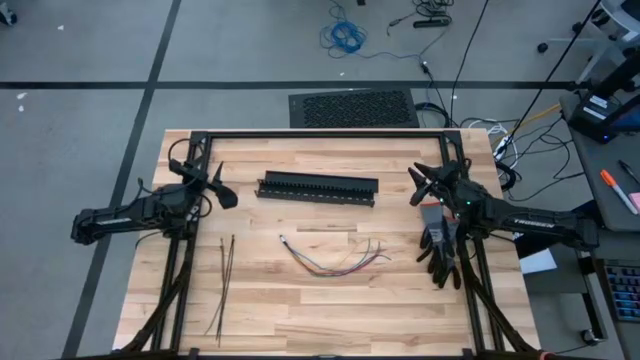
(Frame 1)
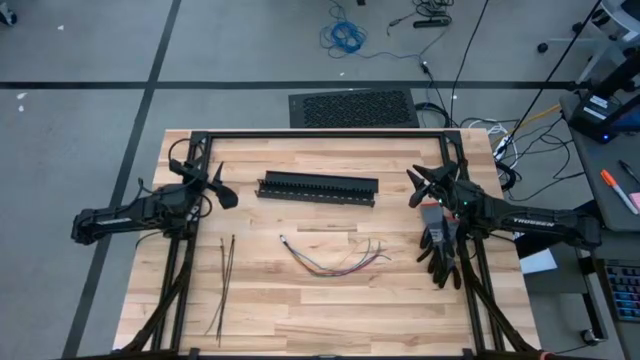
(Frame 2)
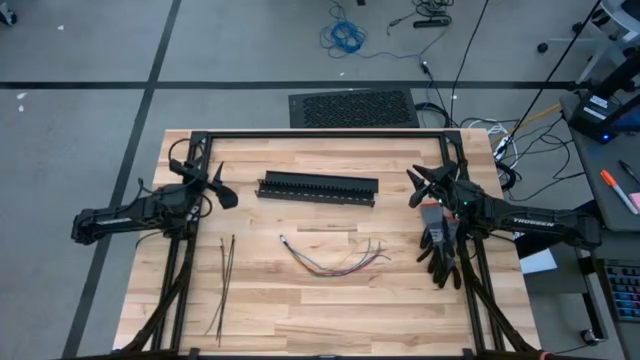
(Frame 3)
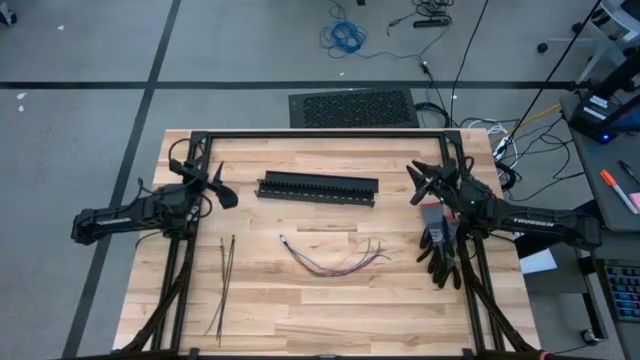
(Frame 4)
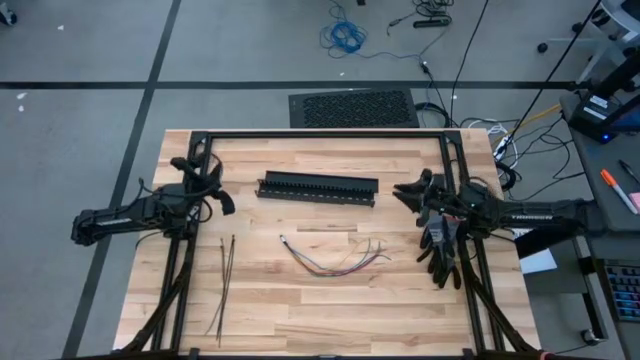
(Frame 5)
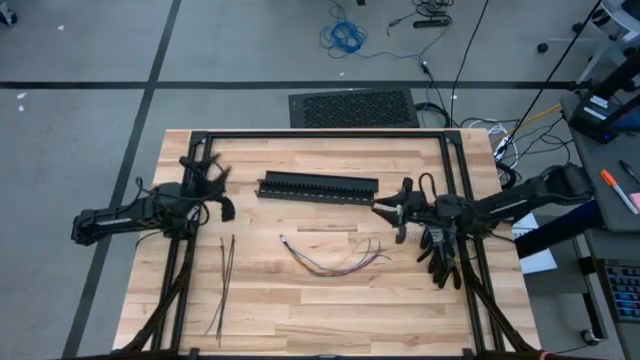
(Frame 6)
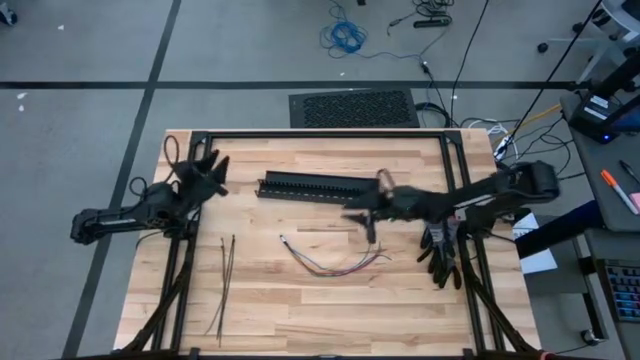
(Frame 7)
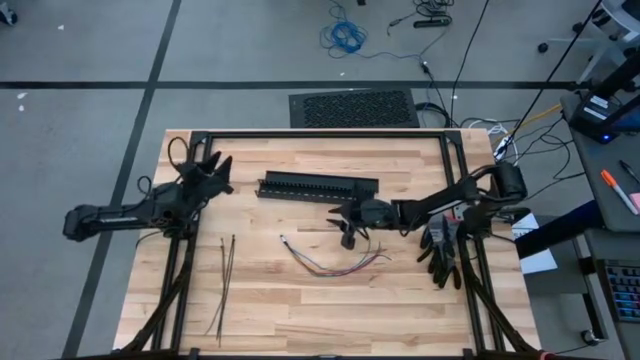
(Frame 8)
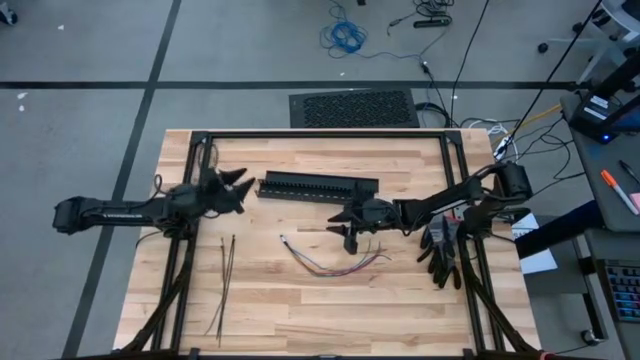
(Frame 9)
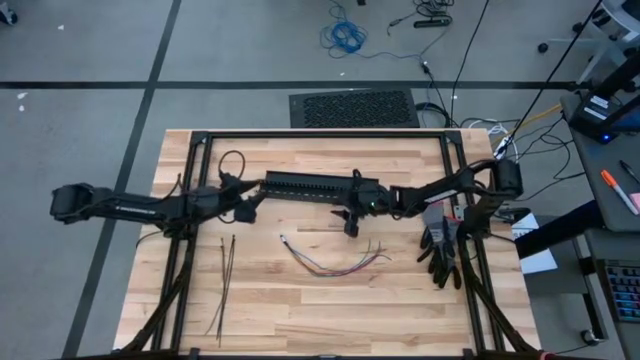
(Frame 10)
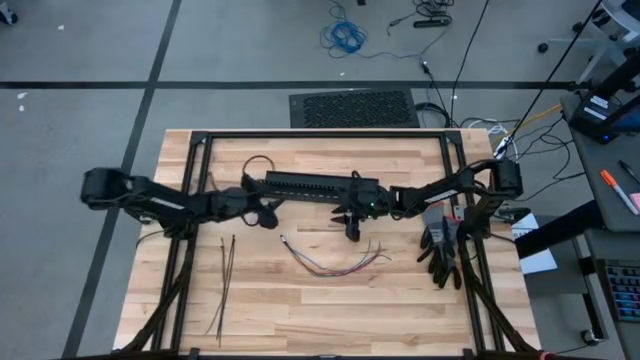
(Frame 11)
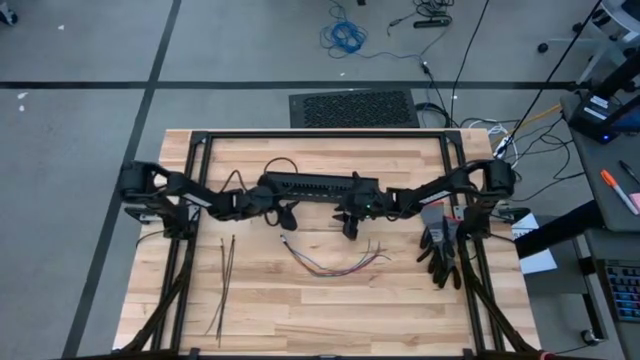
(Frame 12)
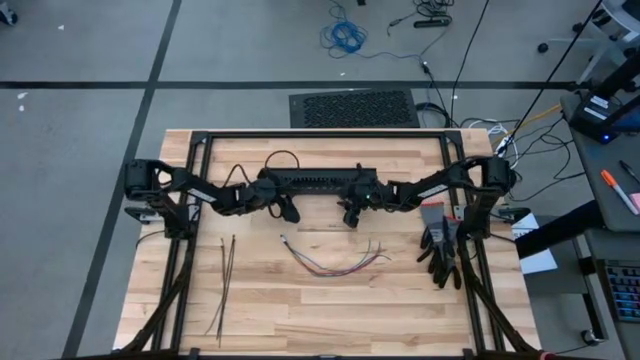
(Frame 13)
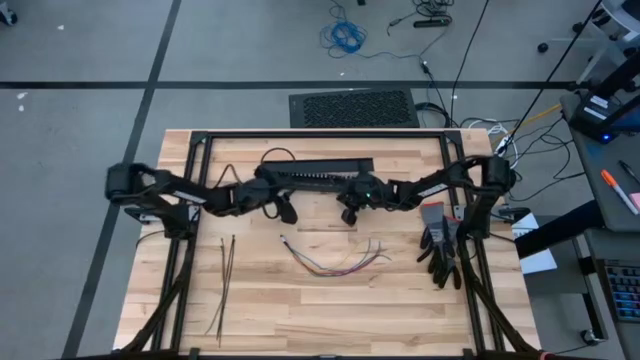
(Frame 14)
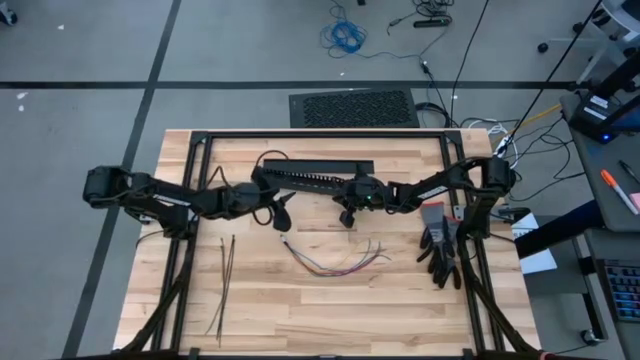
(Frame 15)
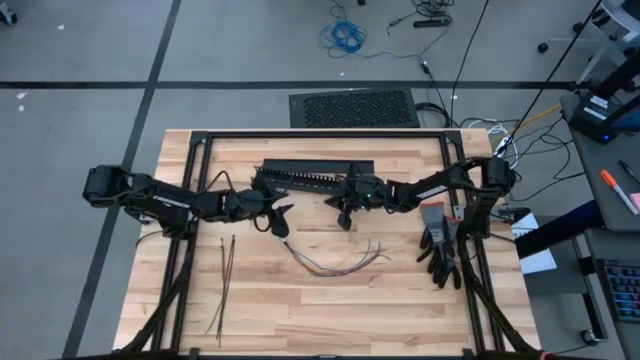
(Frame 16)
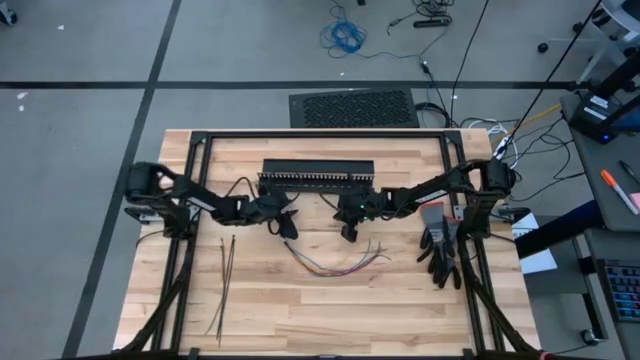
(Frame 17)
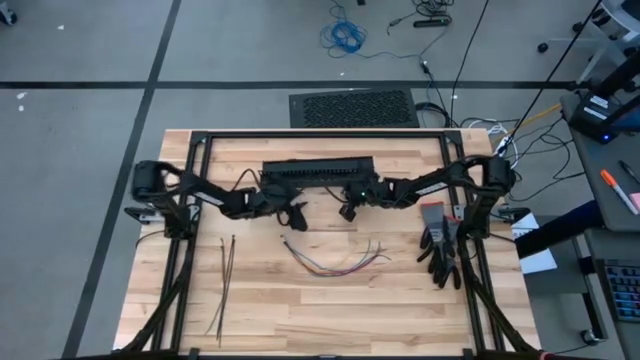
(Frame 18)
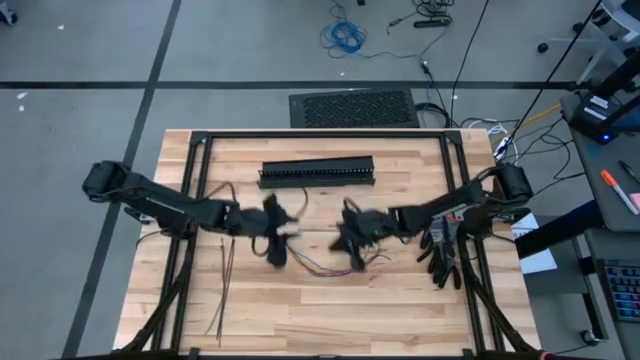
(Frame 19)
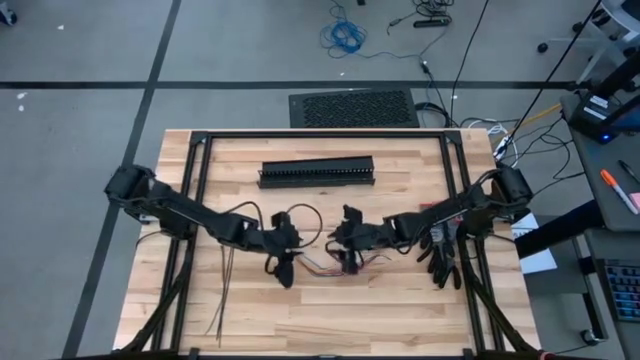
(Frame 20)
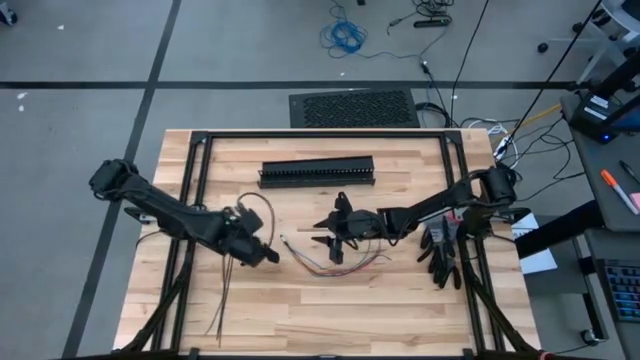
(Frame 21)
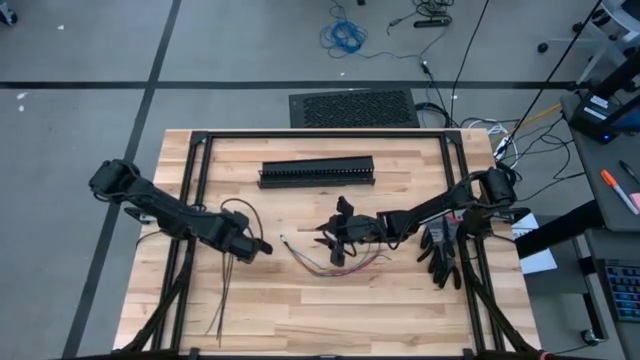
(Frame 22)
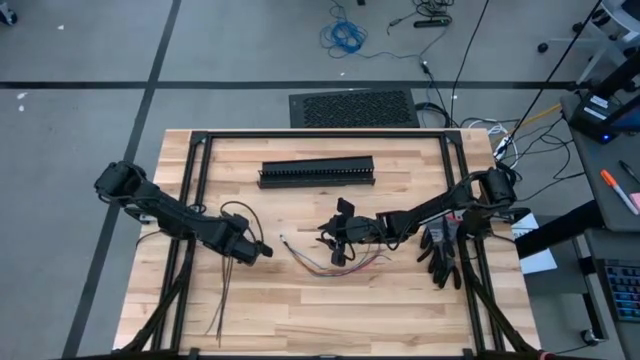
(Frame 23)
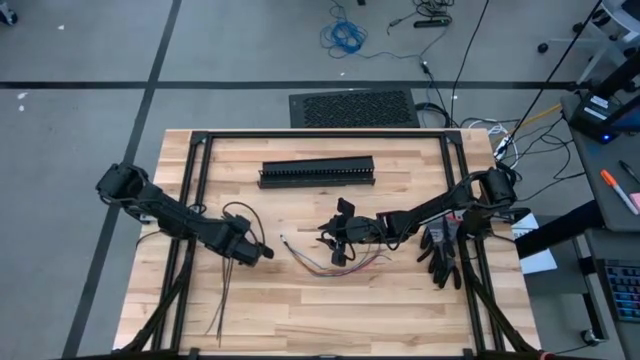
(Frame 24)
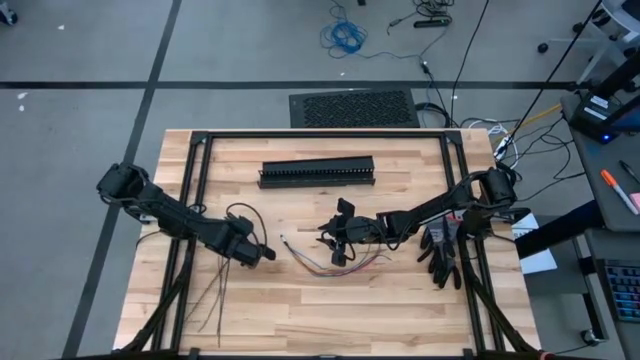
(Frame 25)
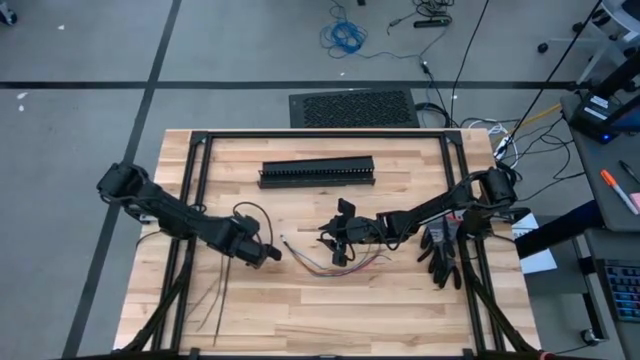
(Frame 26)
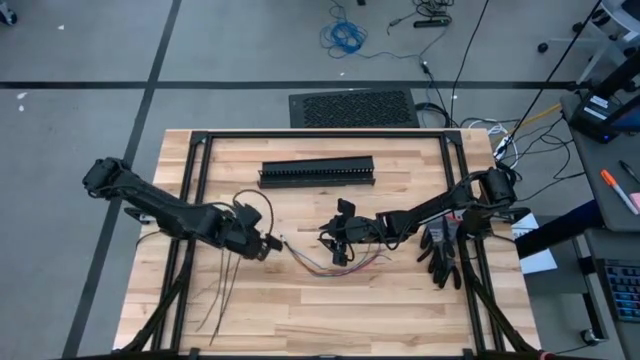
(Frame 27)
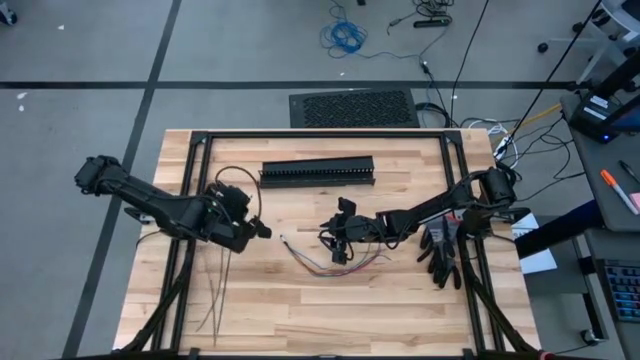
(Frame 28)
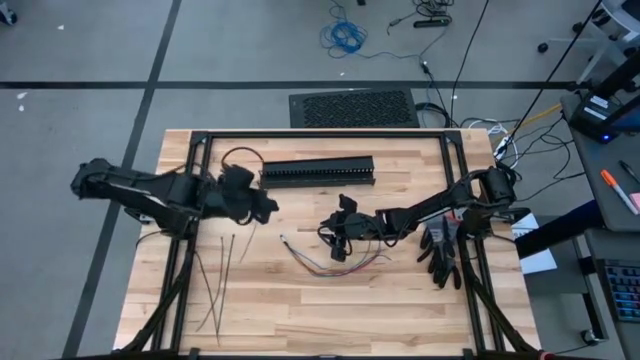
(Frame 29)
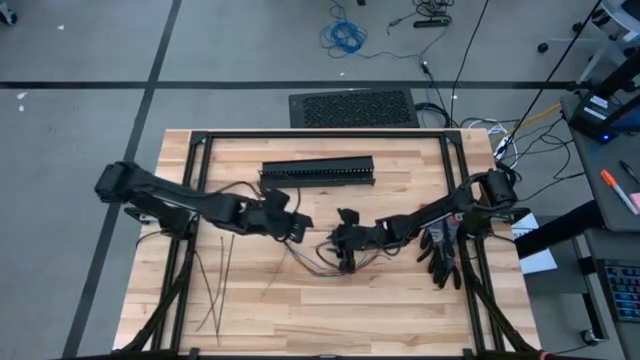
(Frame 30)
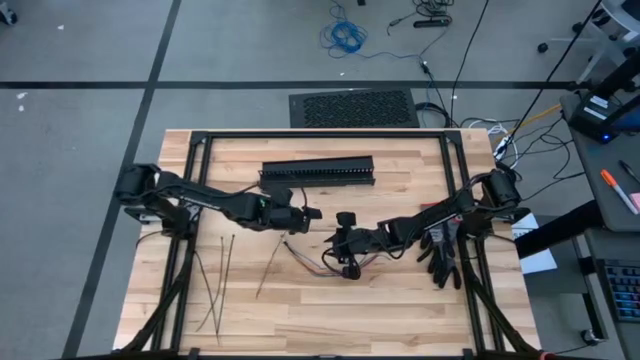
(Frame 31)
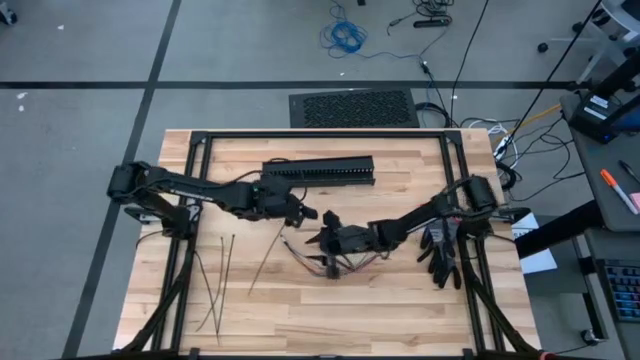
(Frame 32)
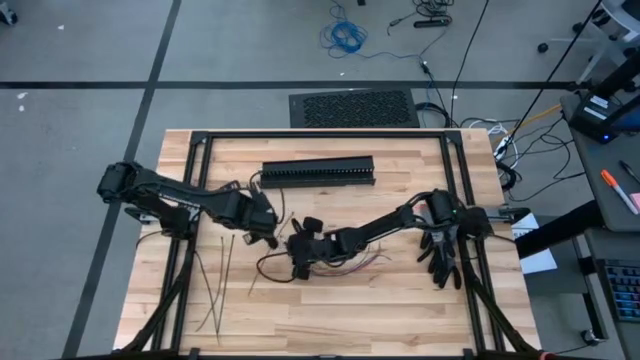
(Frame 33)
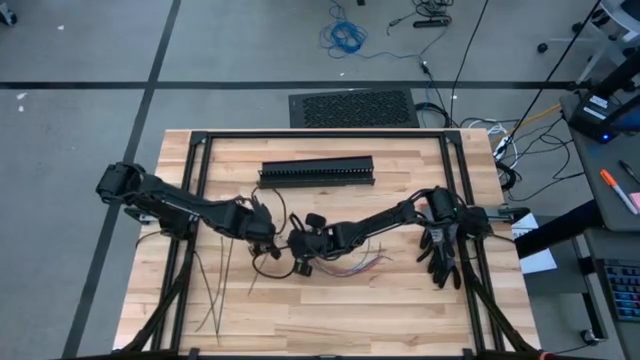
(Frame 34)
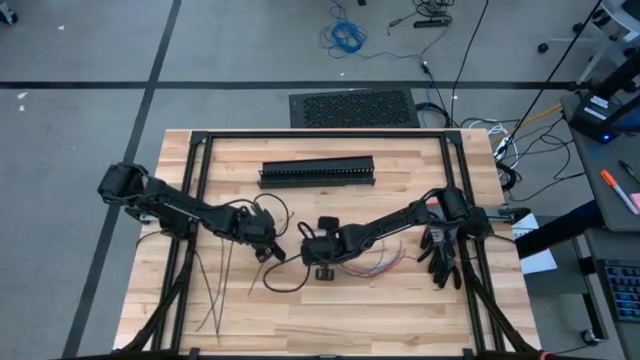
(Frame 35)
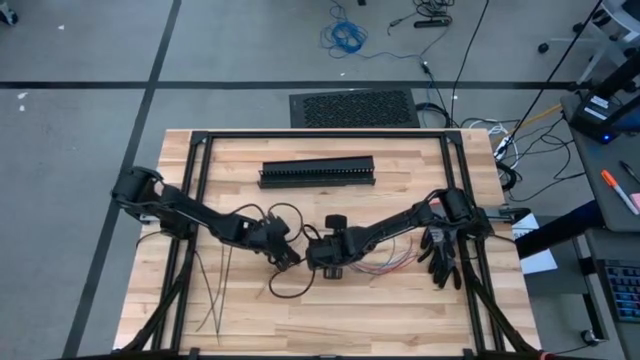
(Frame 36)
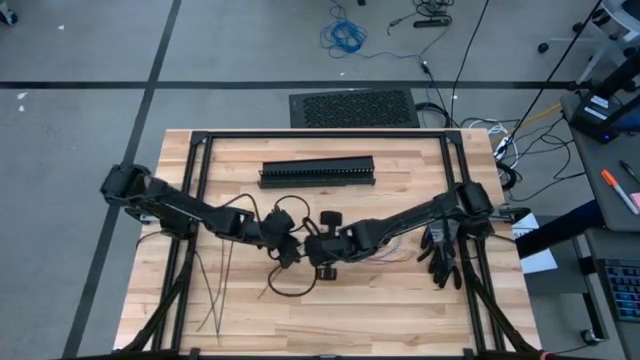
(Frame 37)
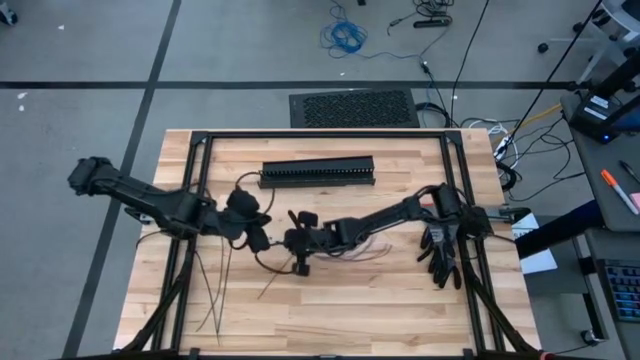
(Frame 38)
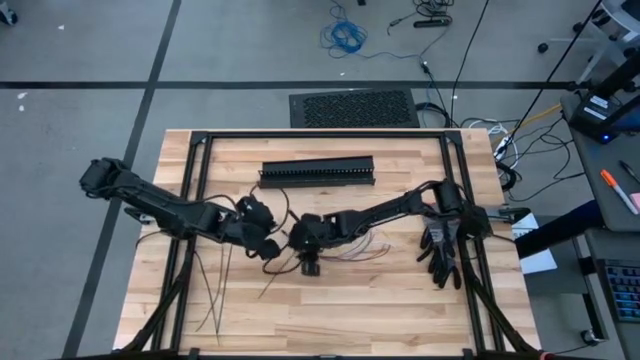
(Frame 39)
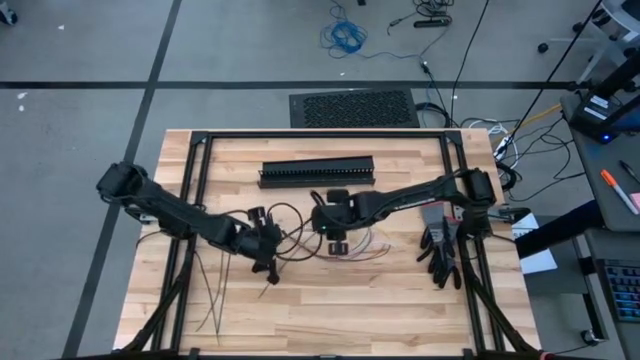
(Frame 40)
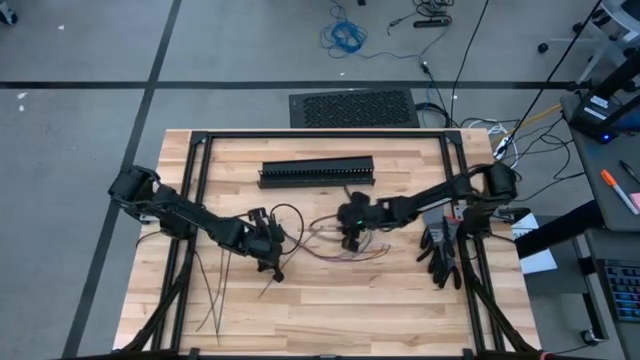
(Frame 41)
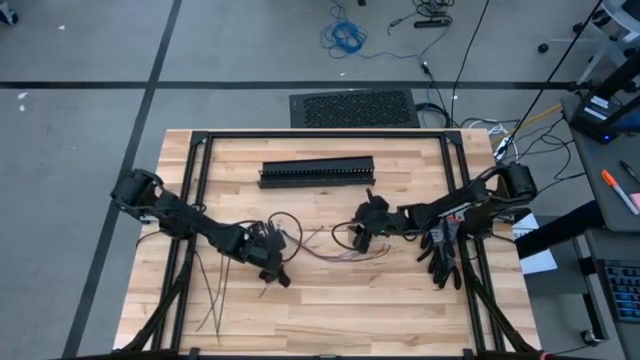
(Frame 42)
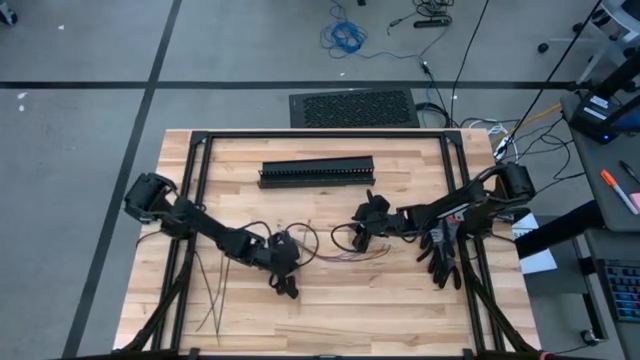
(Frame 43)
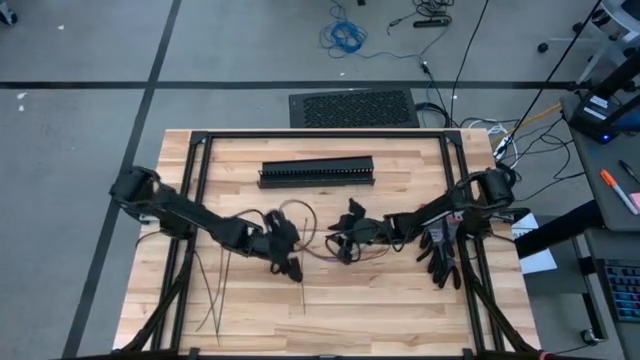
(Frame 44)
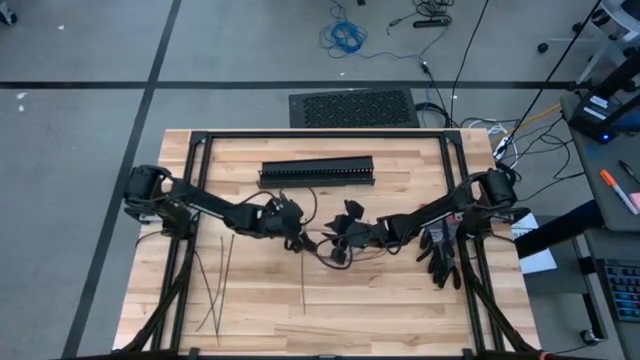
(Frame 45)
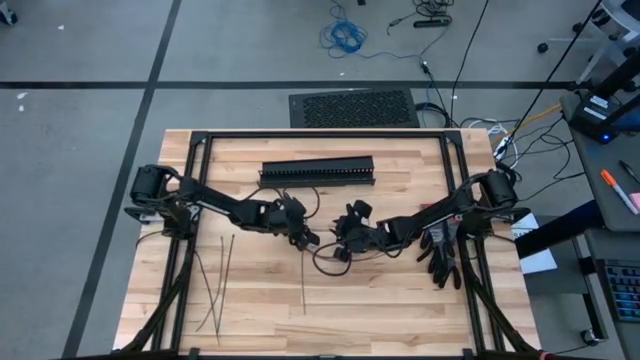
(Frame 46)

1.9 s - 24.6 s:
Task: Ziptie cables
Wrap the zip tie around the cable wires
